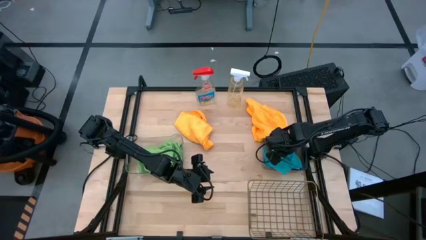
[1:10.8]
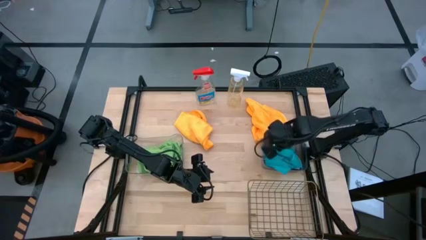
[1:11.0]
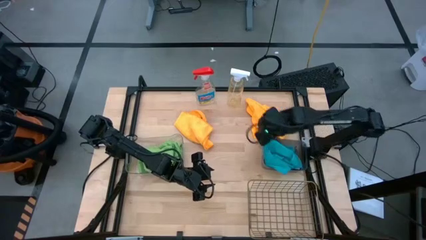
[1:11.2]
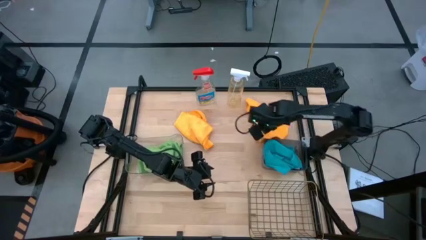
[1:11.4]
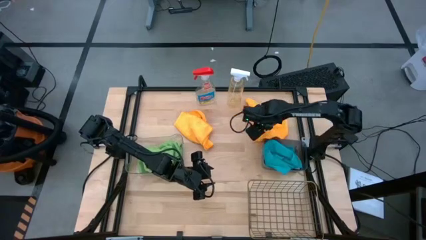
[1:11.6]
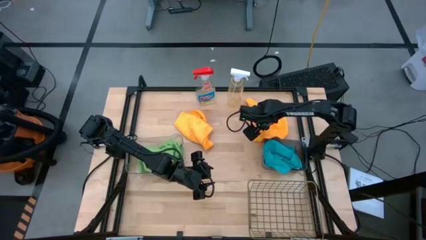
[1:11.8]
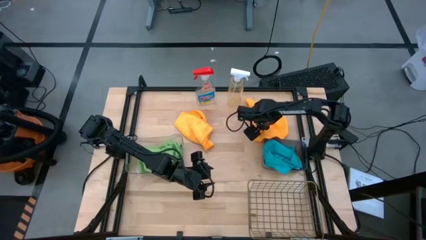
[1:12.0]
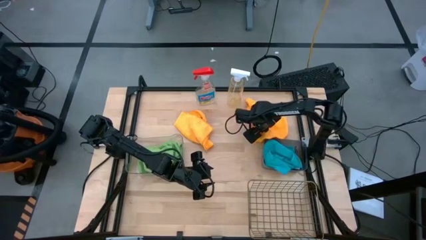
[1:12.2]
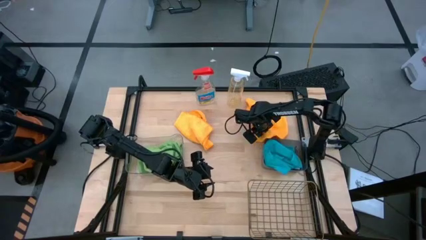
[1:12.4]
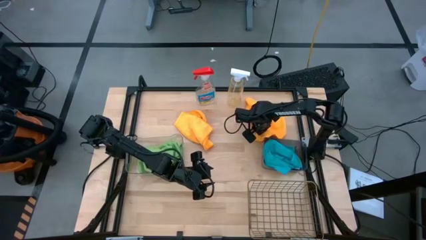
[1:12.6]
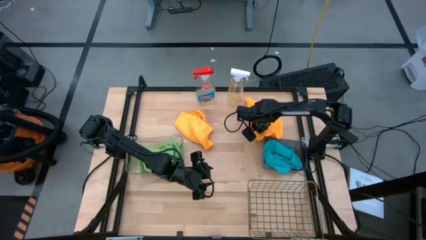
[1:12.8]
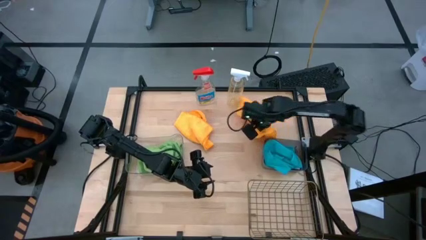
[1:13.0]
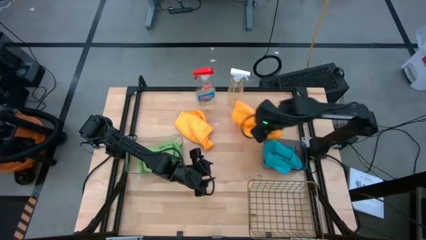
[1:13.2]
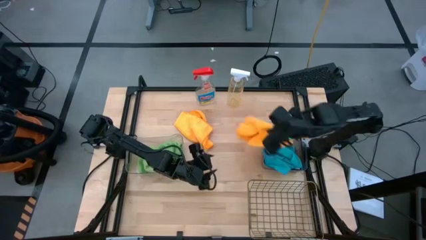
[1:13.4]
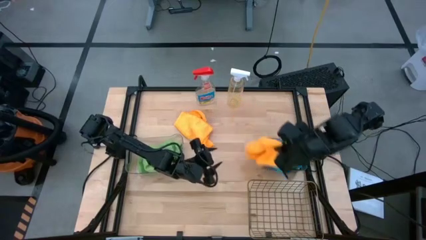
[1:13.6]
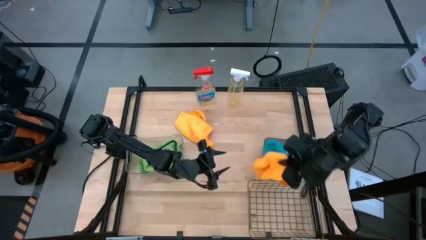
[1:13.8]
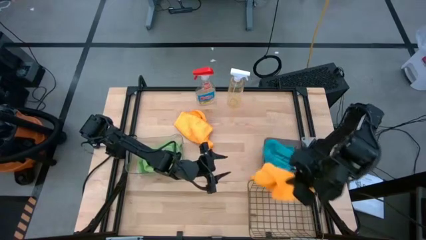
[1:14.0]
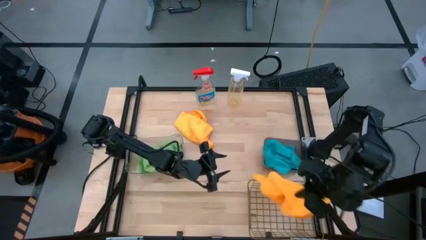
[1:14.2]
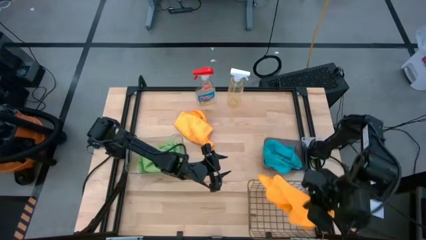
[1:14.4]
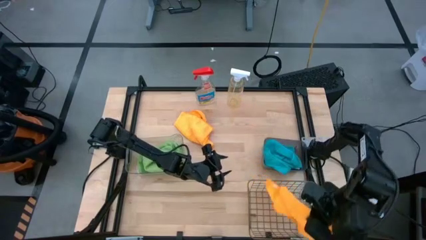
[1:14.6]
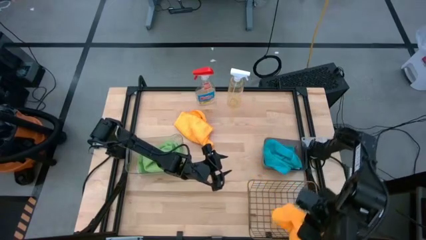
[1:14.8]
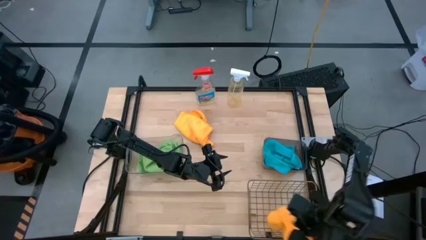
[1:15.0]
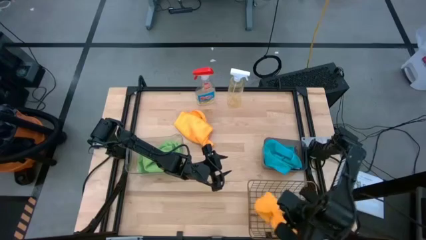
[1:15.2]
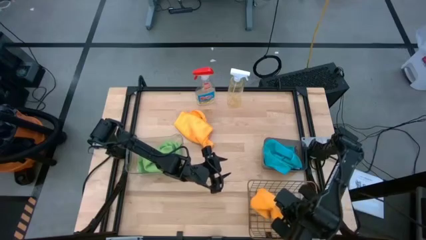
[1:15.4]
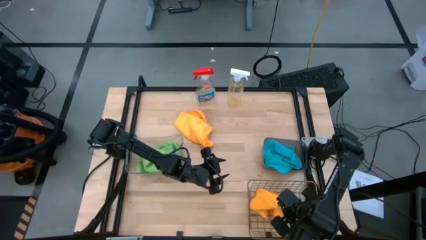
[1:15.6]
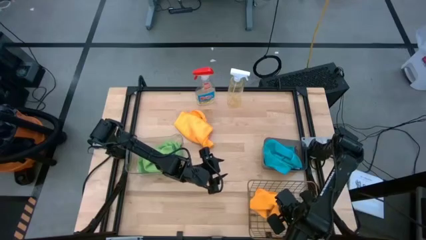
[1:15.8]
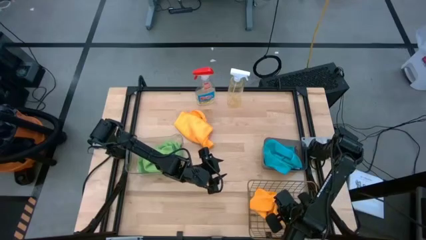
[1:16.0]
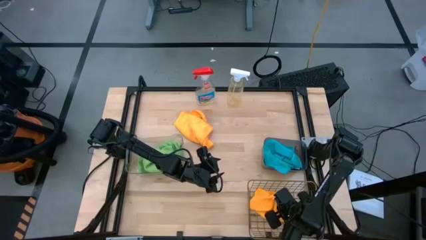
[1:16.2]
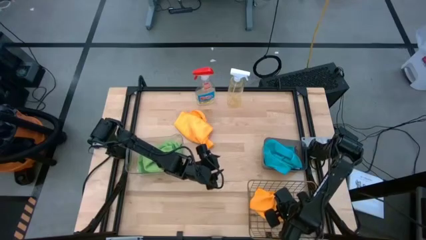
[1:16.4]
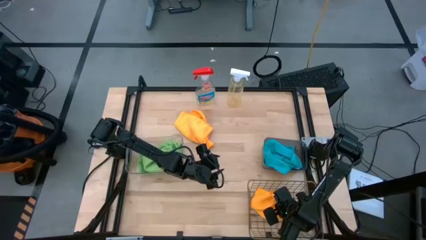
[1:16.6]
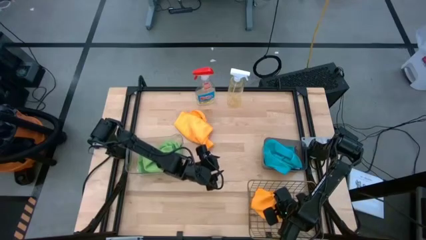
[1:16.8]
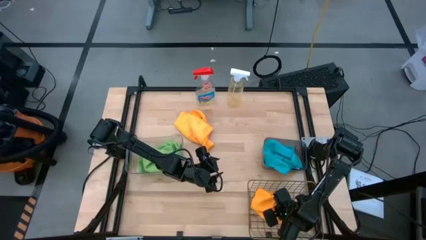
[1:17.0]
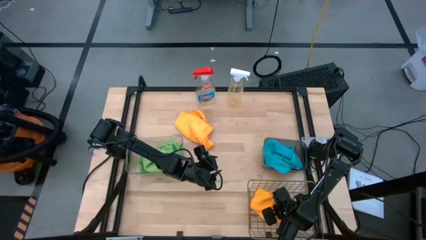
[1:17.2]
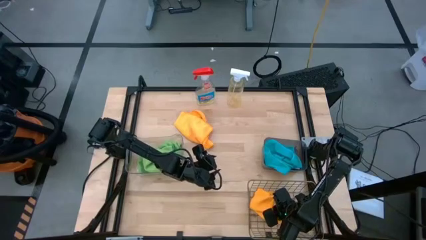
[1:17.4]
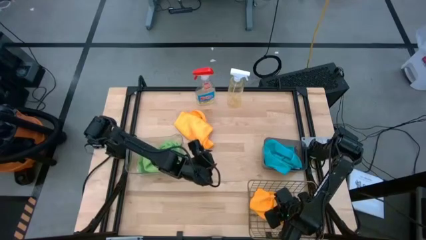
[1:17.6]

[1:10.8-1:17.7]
Task: Sort microfiber towel by color & place in baskets
Put the right yellow microfiber cloth into the metal wire basket

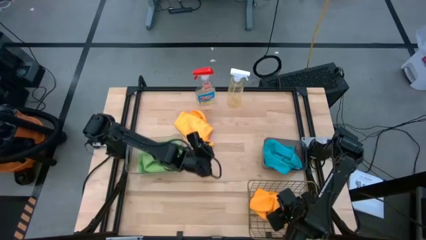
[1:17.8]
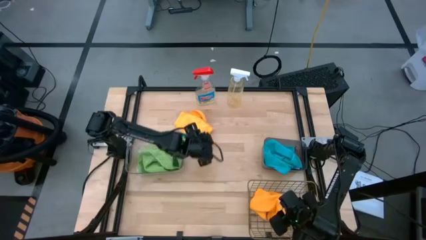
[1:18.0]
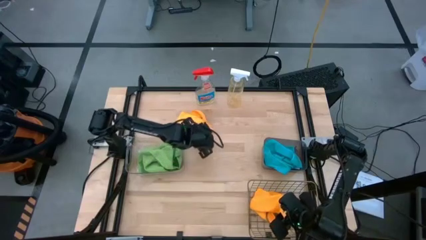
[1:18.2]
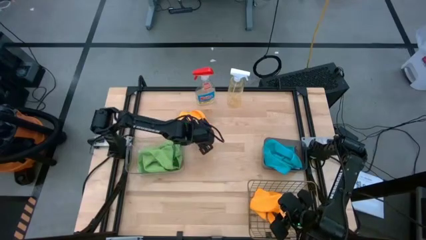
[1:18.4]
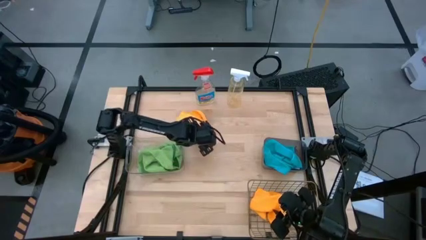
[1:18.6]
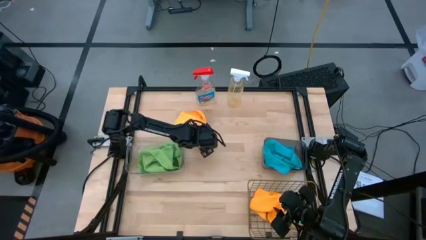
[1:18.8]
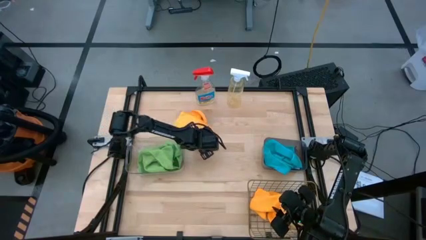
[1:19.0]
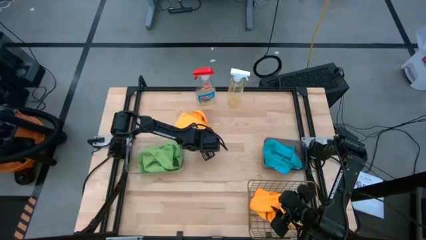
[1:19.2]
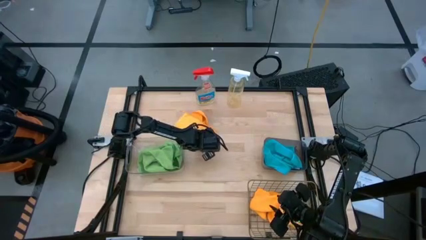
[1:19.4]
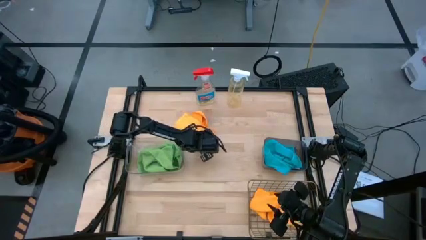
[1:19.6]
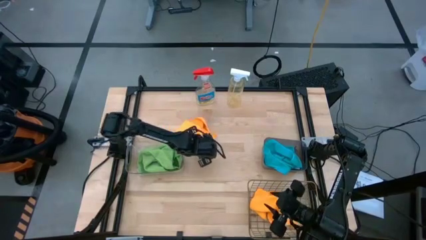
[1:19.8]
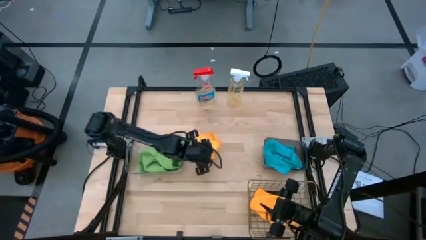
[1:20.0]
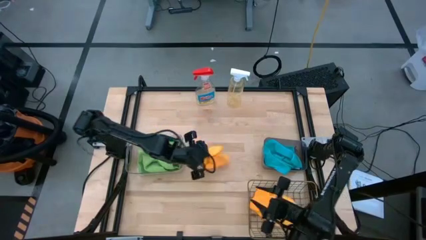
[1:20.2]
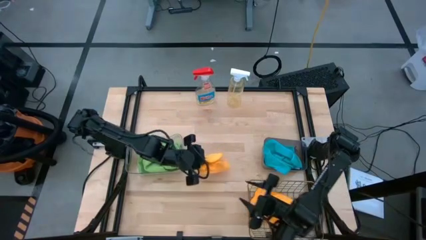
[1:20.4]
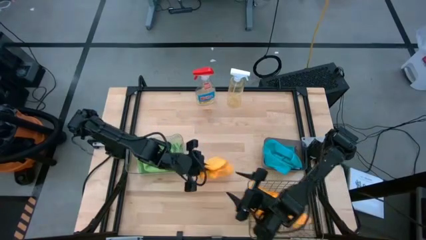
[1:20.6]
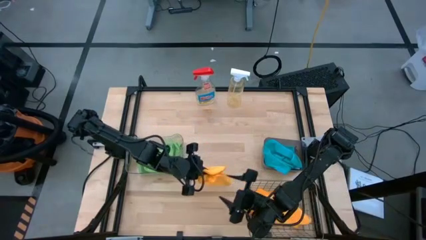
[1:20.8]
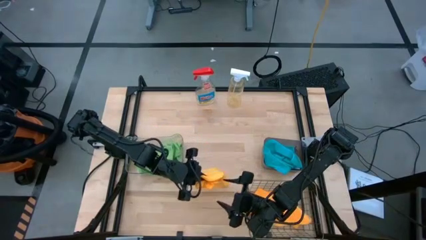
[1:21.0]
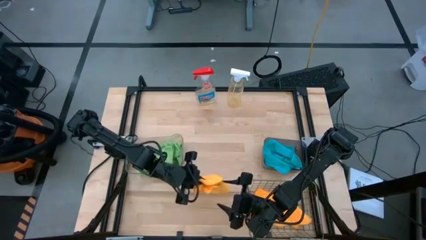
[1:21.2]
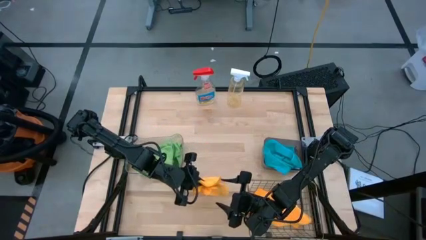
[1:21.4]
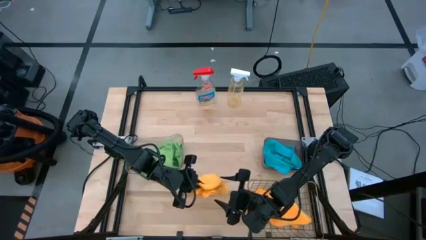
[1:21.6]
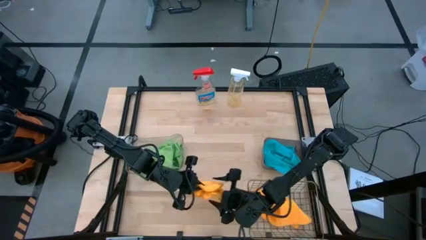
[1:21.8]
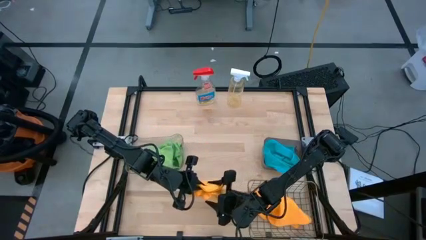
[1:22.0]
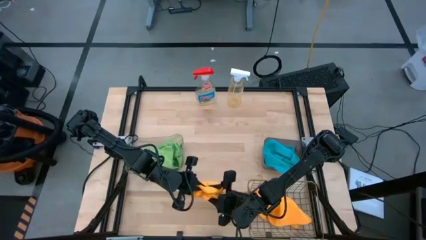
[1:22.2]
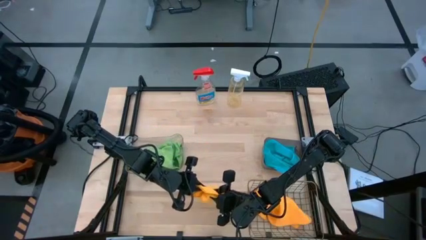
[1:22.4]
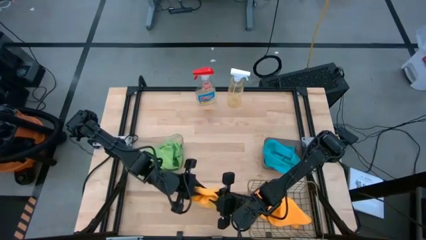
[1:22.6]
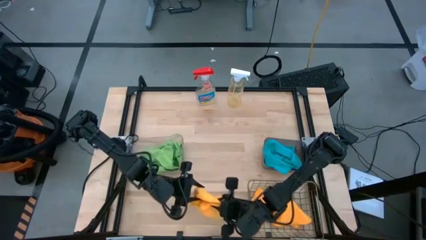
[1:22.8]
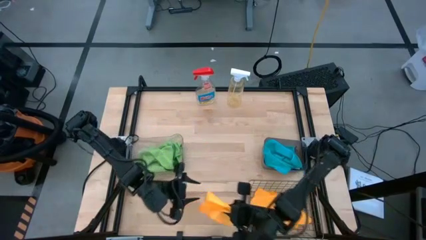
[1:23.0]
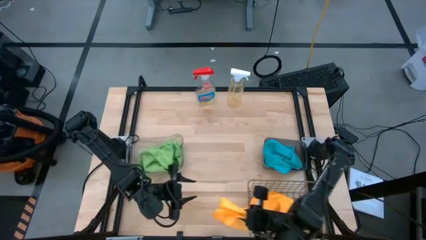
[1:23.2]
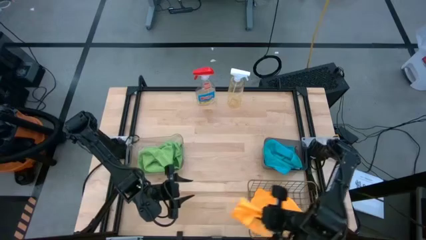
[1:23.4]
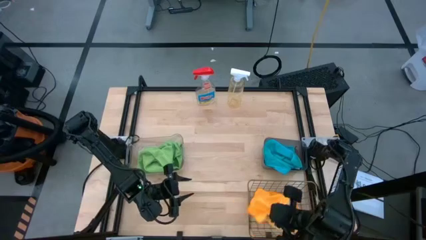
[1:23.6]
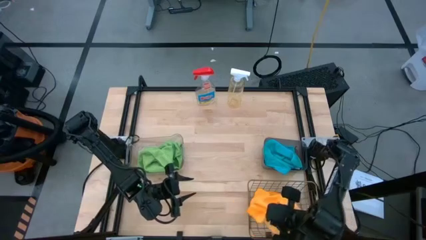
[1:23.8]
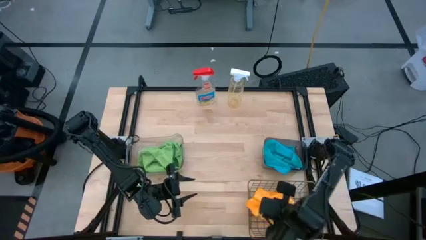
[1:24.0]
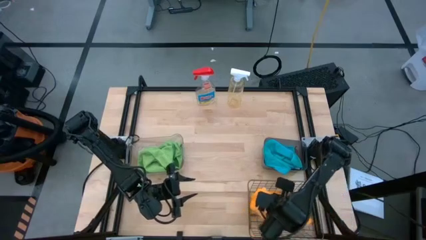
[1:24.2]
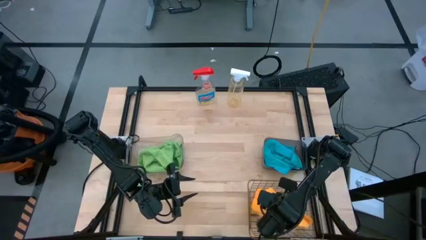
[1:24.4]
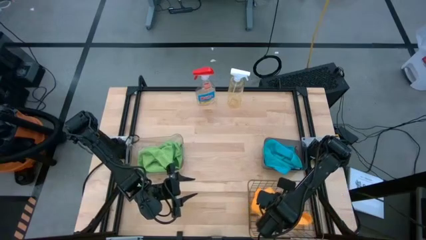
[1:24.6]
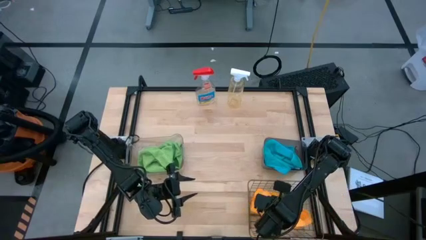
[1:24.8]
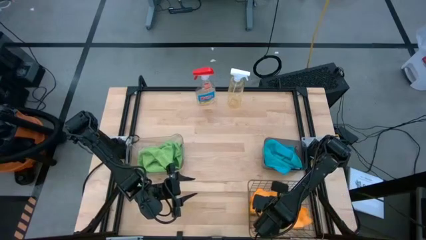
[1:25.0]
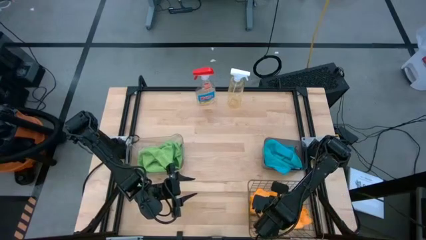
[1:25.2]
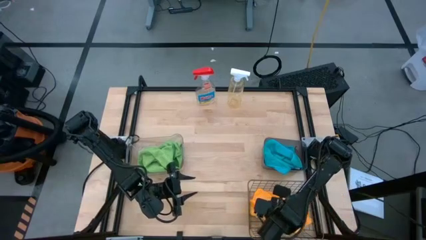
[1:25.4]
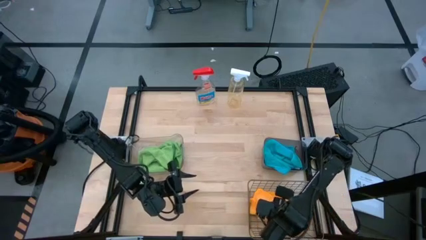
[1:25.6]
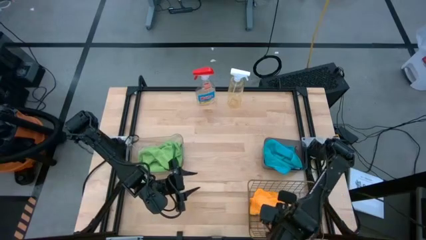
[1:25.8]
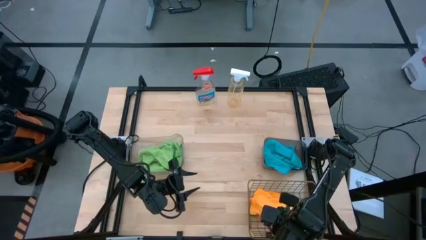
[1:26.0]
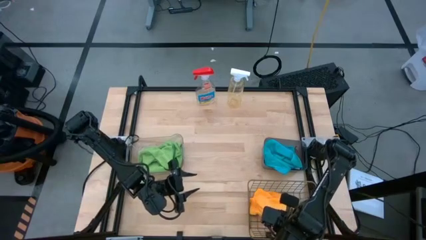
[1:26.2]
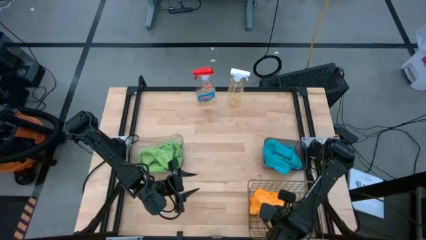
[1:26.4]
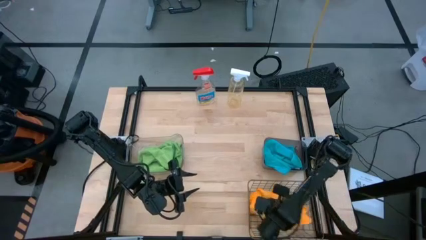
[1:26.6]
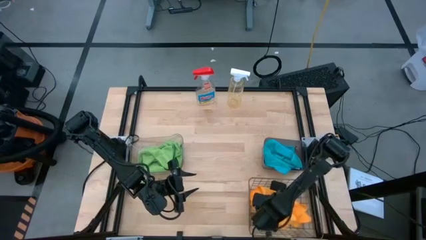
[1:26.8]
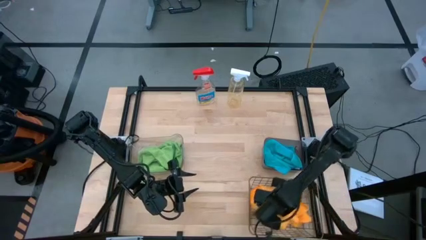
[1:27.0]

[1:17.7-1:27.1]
Put the yellow microfiber cloth into the metal wire basket
